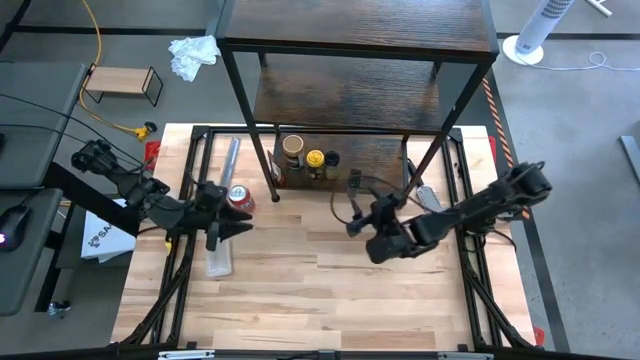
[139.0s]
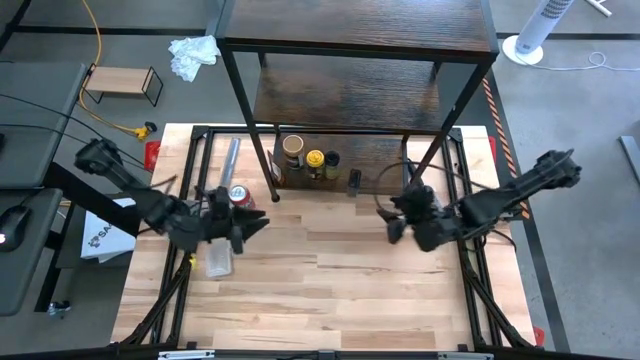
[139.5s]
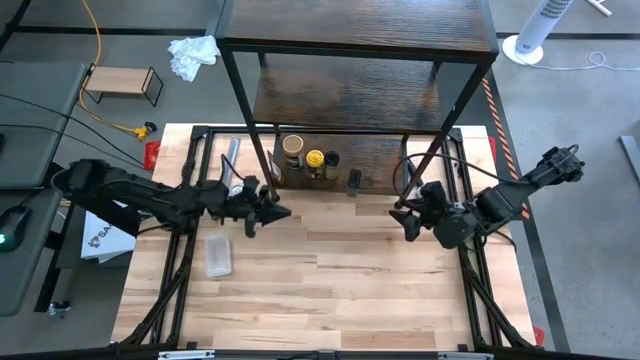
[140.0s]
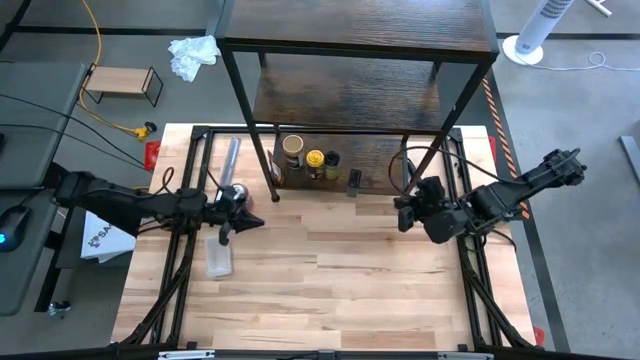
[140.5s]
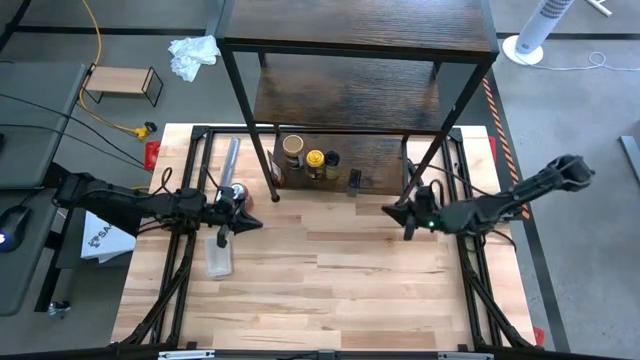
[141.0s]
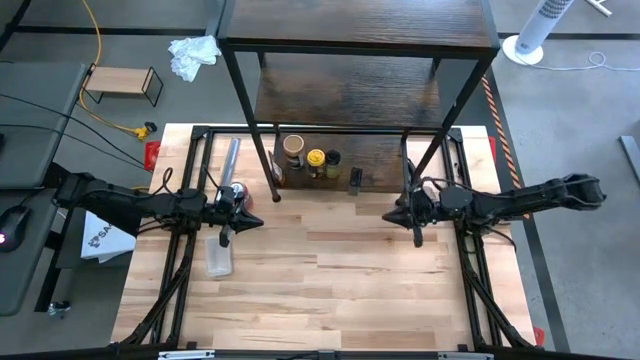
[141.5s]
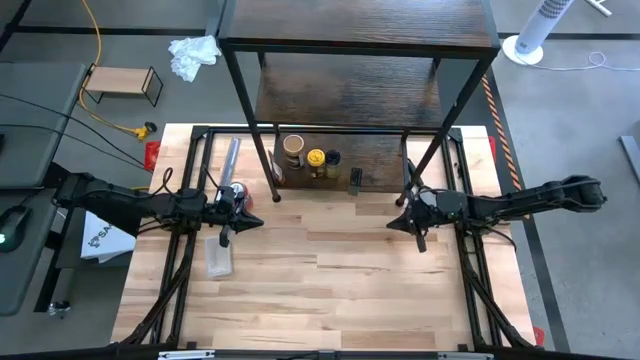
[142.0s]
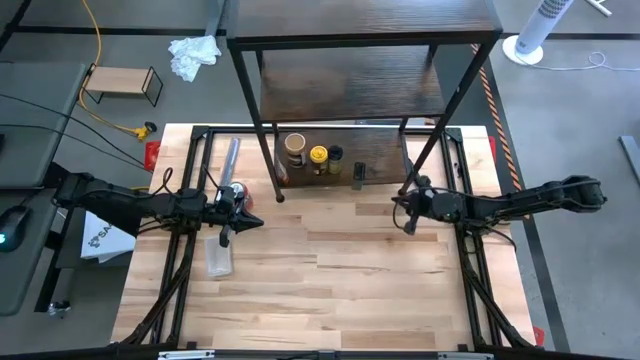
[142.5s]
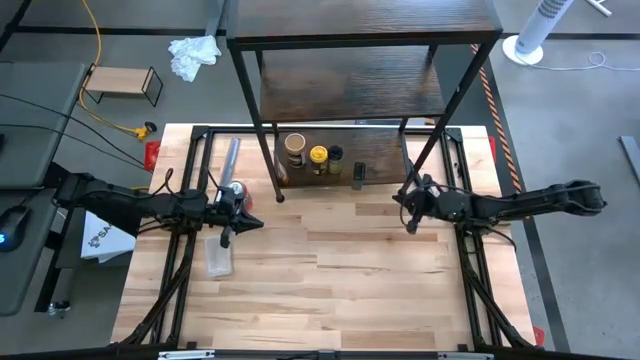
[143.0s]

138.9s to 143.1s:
Task: Shelf spices
Adjust the shelf

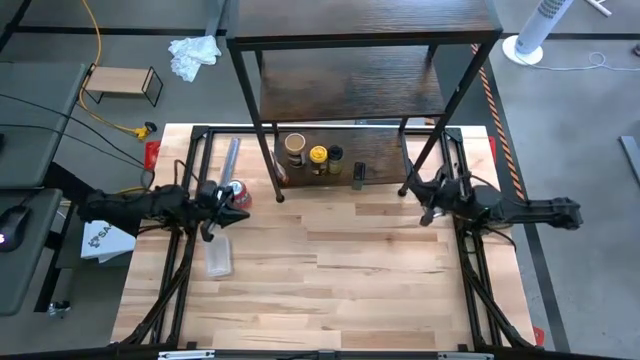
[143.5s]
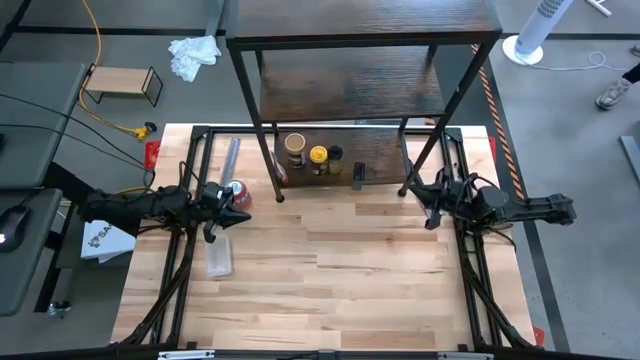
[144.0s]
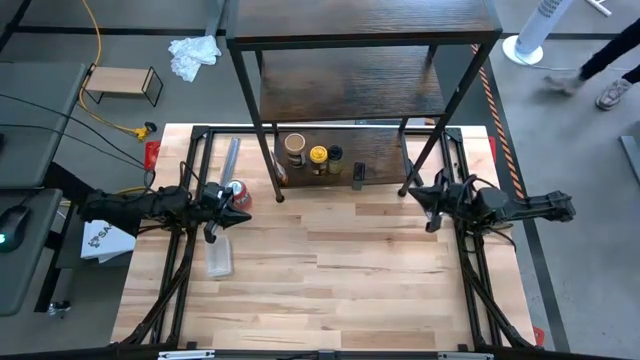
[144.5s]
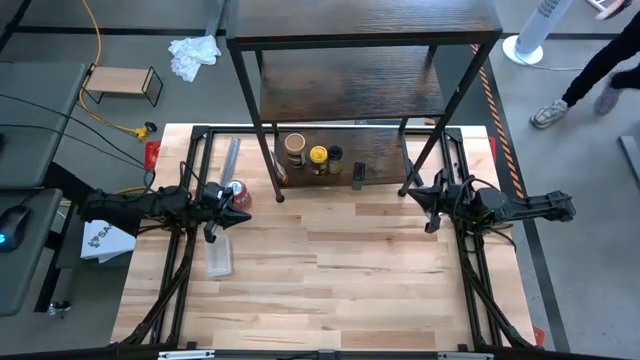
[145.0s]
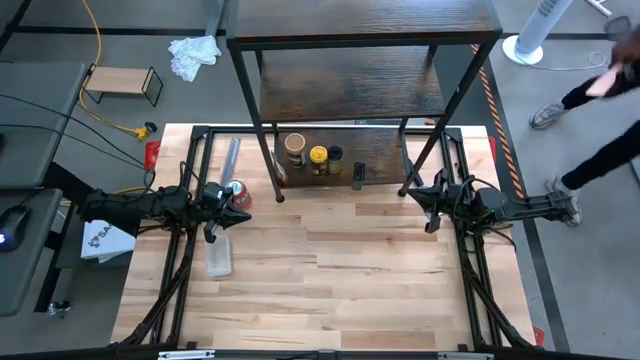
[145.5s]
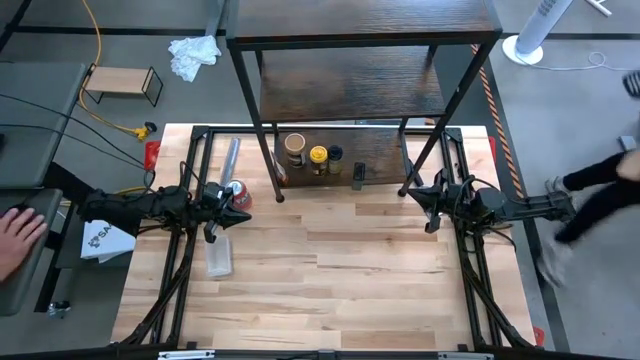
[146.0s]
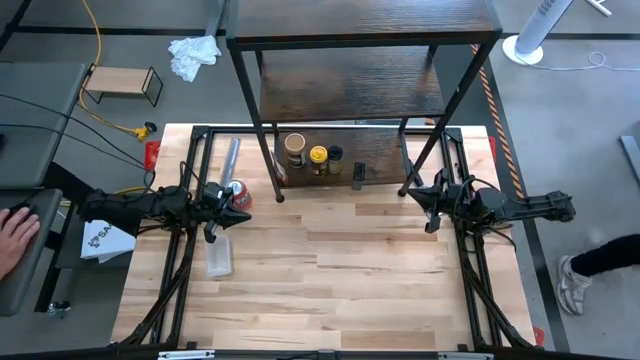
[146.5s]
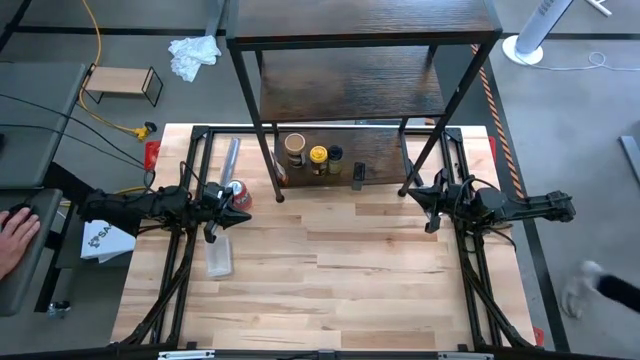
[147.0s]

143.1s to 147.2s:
Return to Home Position

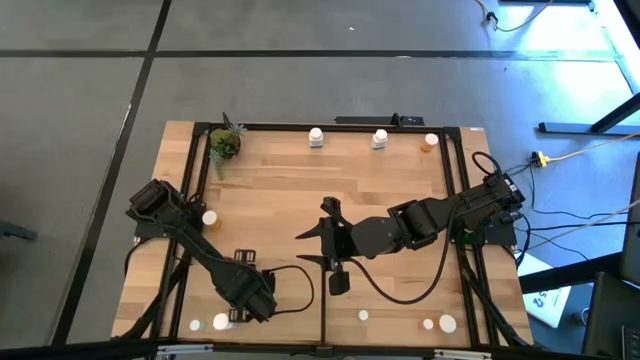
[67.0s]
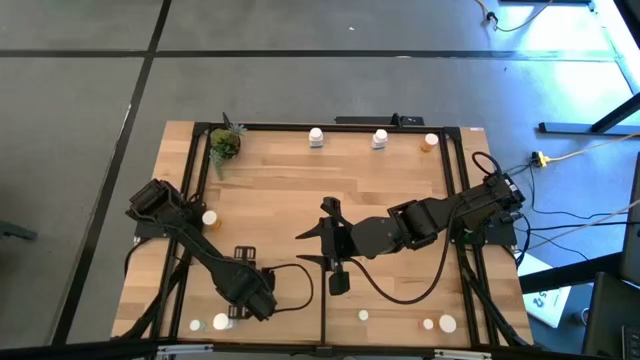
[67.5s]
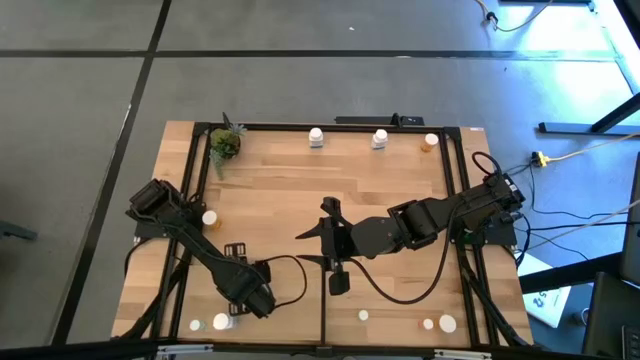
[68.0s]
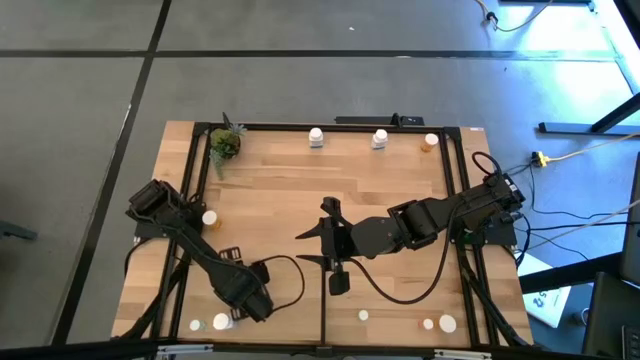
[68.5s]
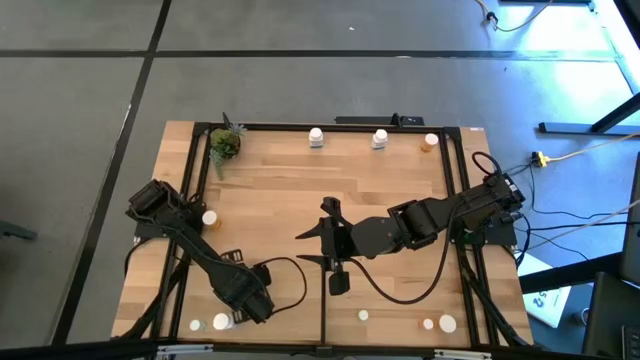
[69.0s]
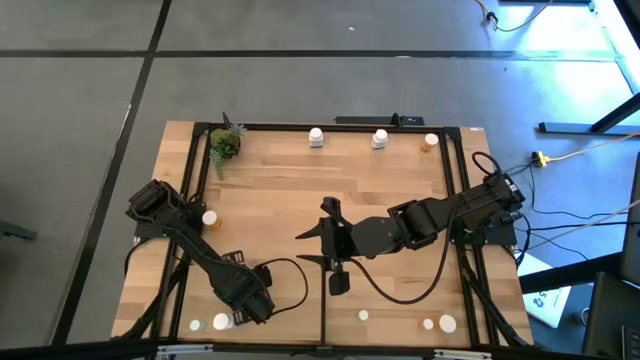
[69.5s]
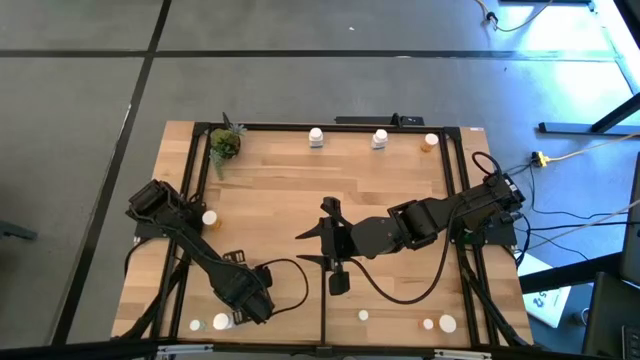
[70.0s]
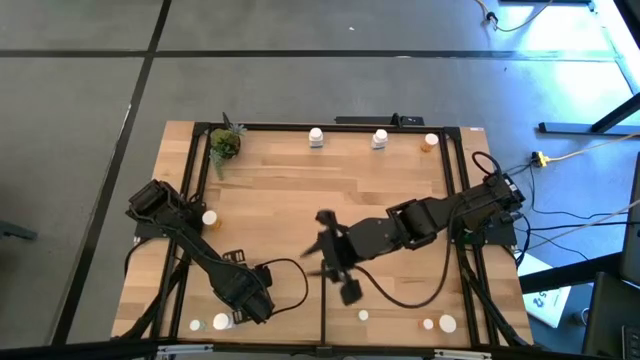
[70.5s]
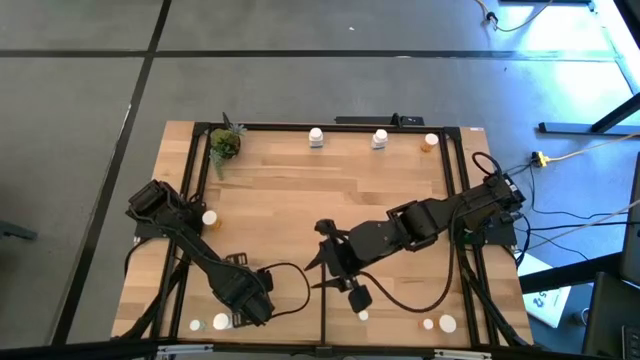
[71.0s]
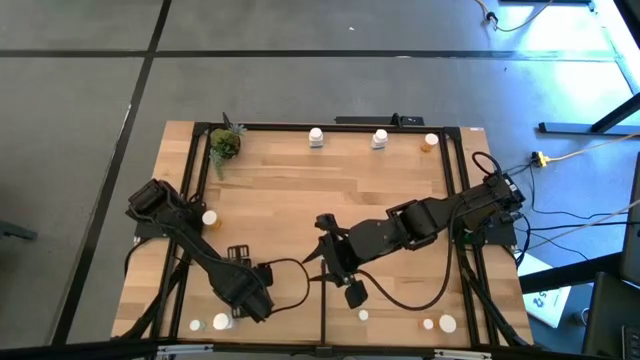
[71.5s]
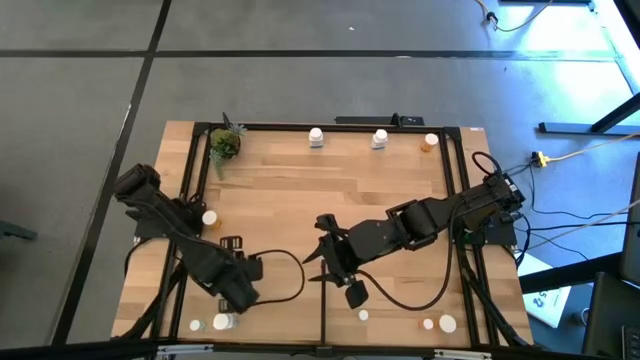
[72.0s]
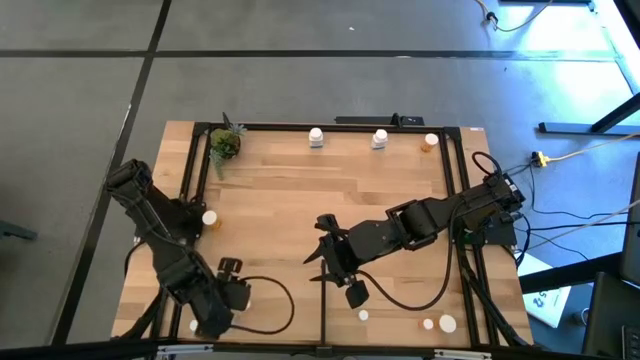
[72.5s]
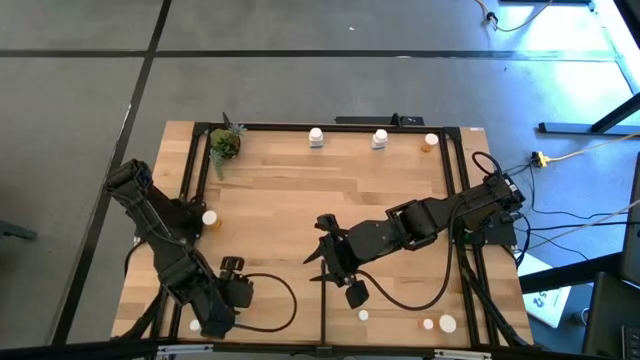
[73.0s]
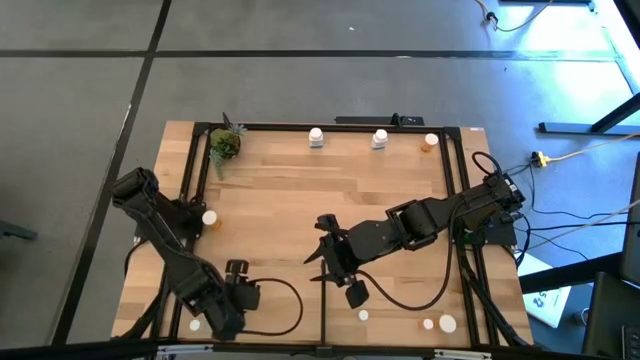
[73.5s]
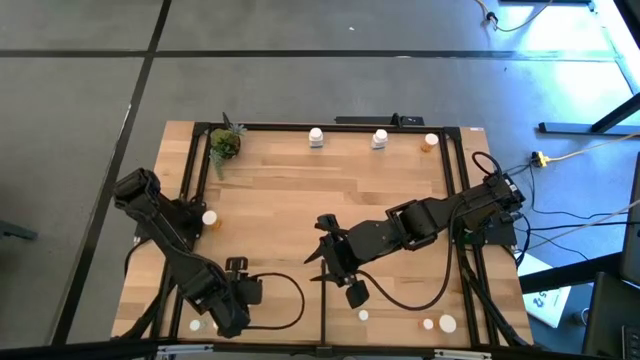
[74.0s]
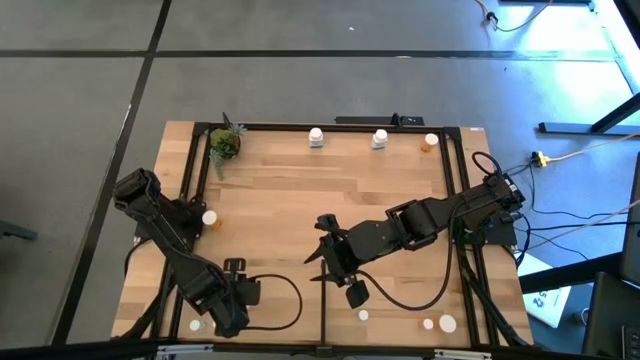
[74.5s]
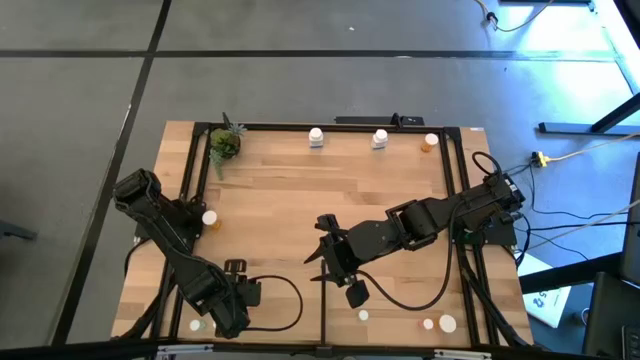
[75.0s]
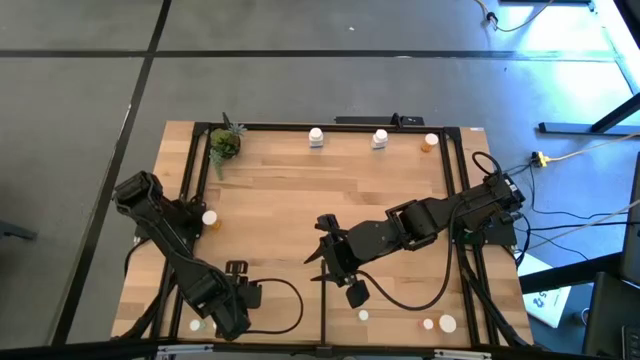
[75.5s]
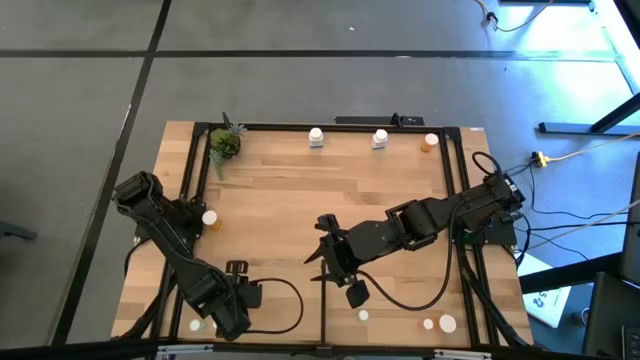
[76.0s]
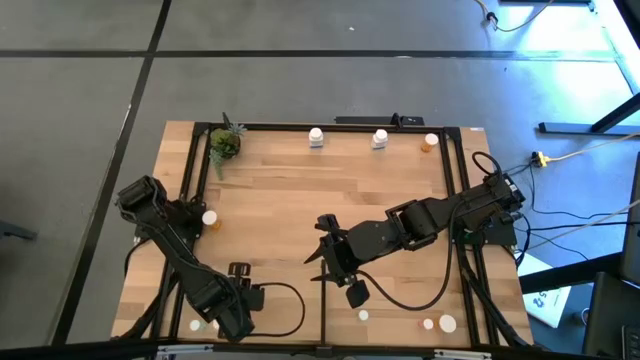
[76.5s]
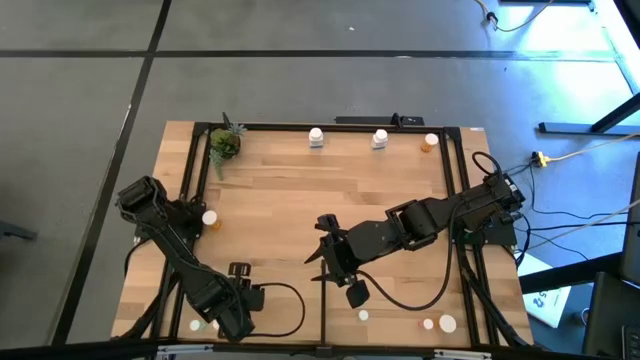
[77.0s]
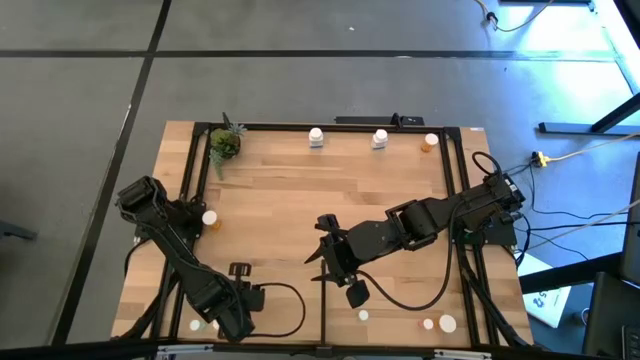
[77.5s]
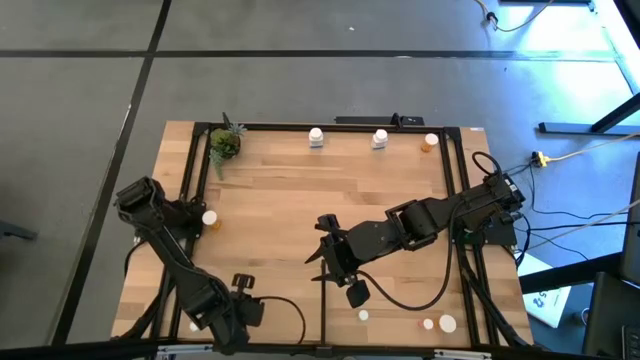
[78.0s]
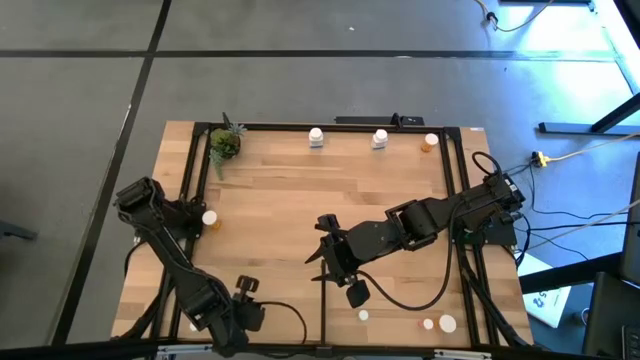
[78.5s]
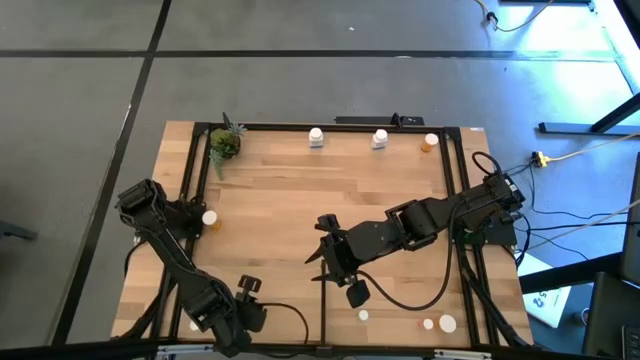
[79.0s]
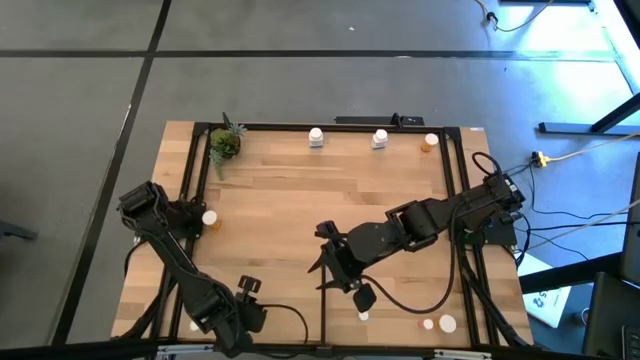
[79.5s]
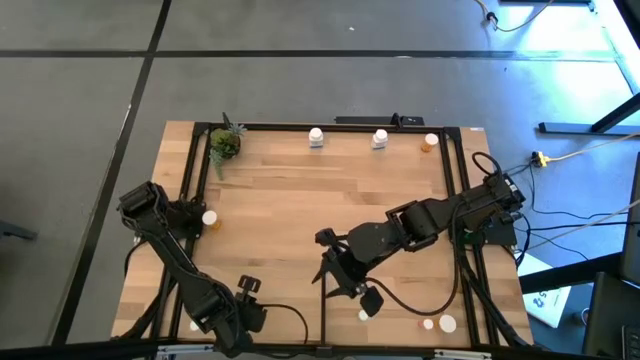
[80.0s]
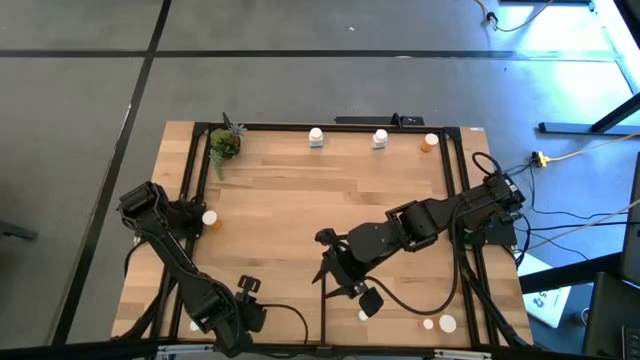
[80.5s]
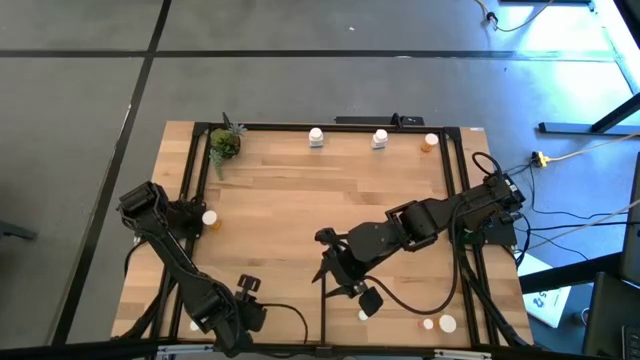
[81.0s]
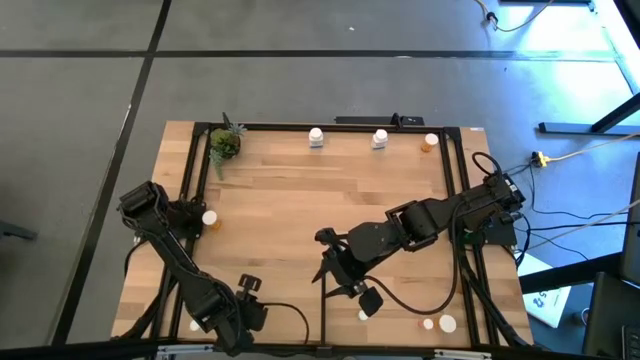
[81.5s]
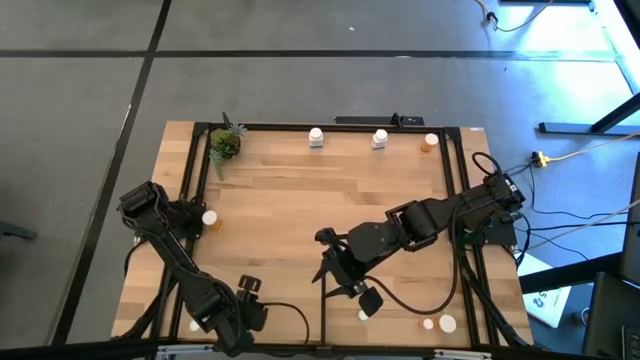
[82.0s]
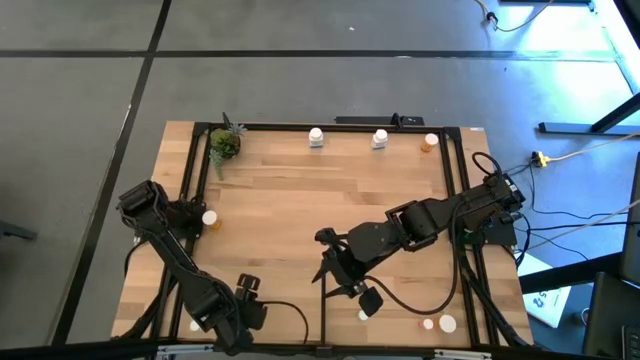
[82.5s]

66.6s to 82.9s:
Task: Pick and place medicine bottles onto shelf by color
Put the top left pink pill bottle on the shelf
